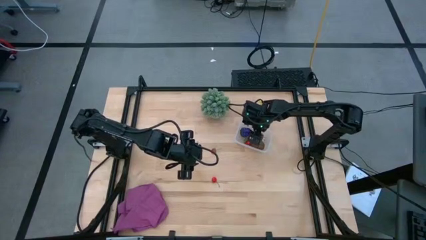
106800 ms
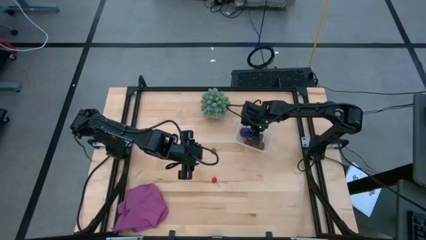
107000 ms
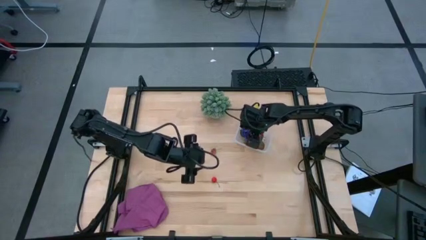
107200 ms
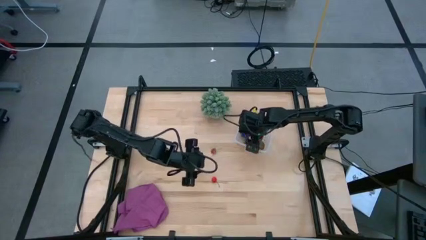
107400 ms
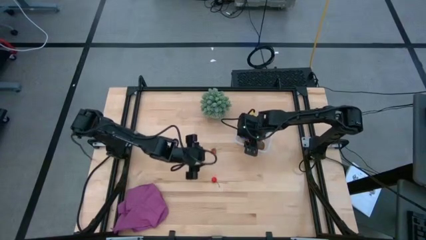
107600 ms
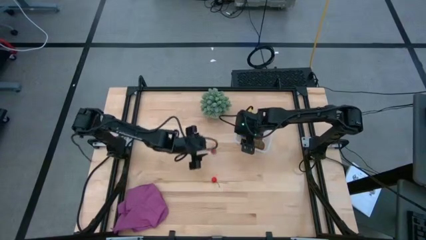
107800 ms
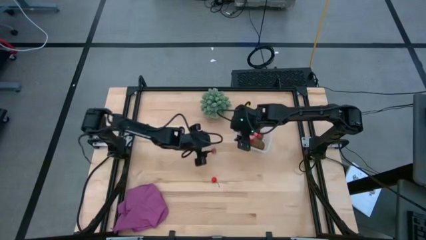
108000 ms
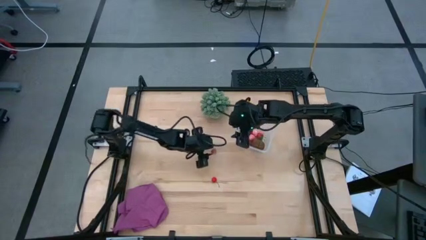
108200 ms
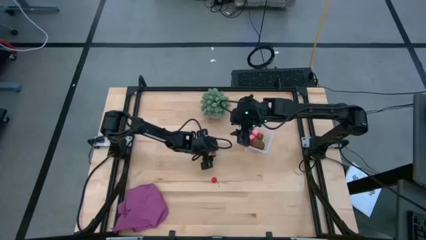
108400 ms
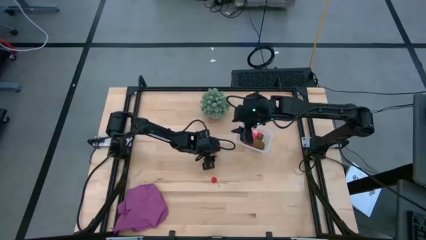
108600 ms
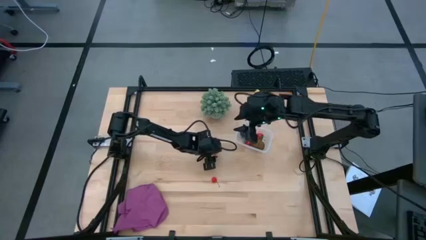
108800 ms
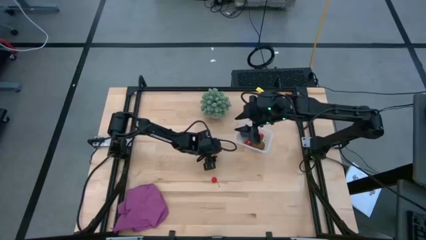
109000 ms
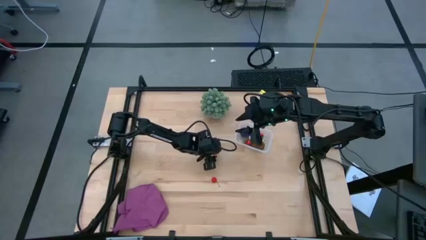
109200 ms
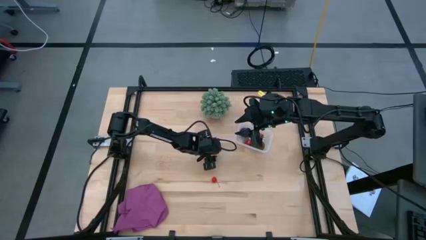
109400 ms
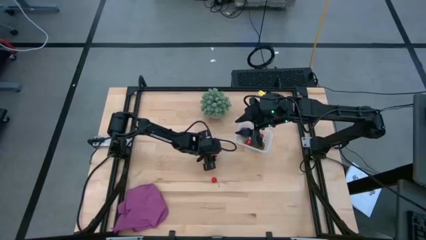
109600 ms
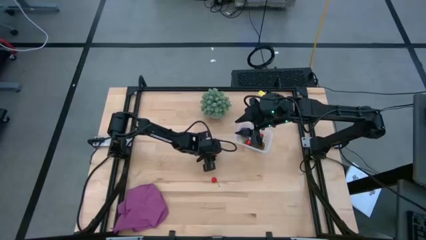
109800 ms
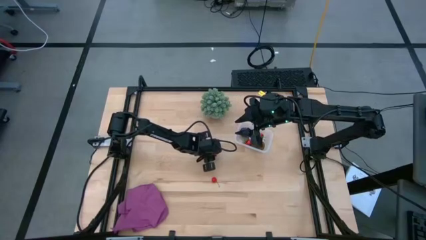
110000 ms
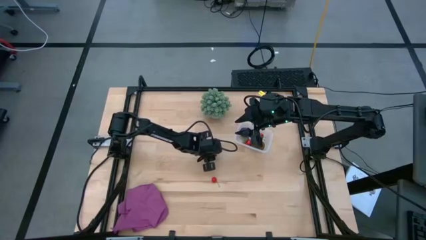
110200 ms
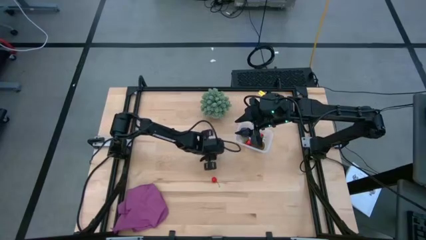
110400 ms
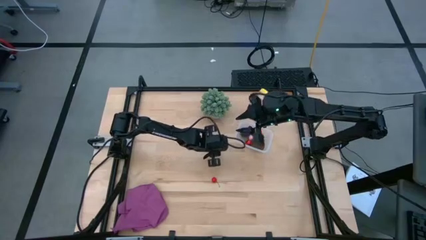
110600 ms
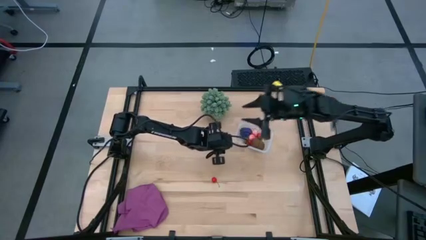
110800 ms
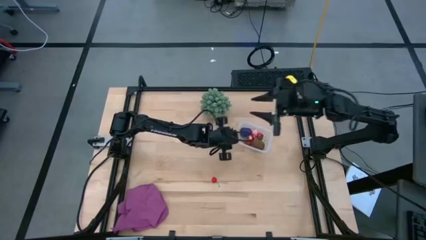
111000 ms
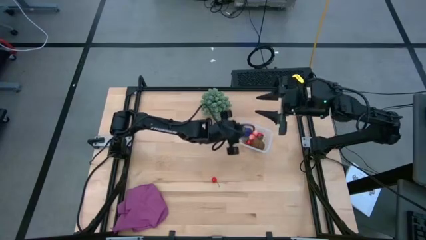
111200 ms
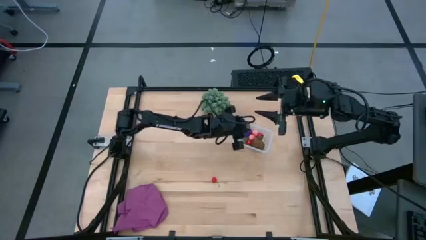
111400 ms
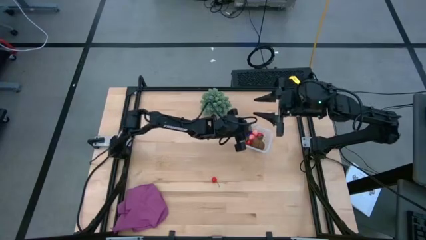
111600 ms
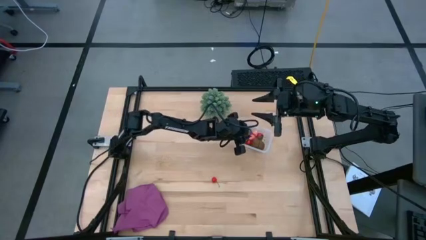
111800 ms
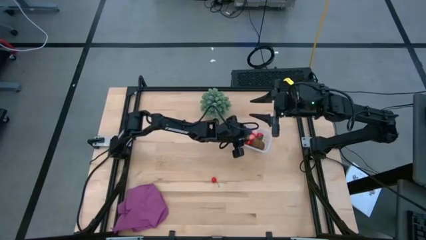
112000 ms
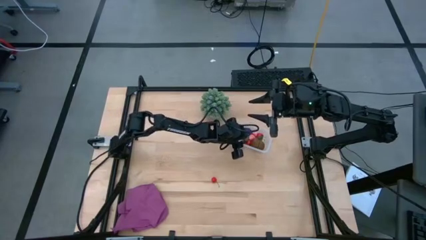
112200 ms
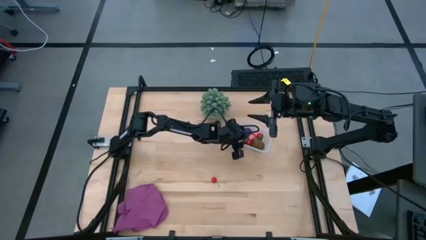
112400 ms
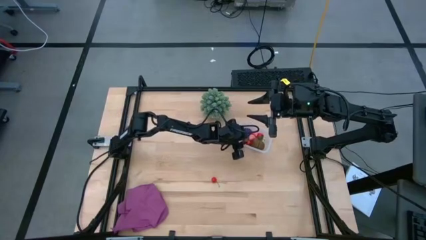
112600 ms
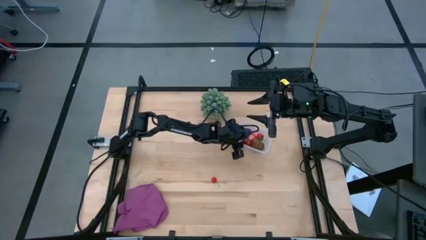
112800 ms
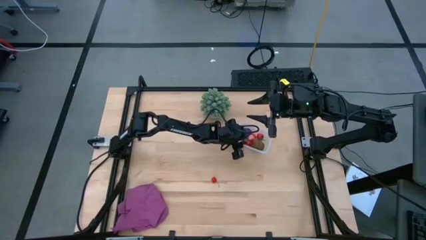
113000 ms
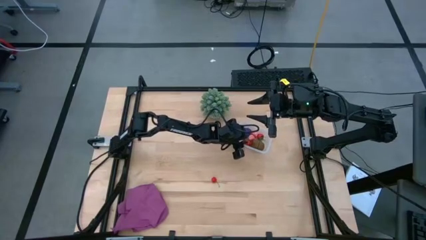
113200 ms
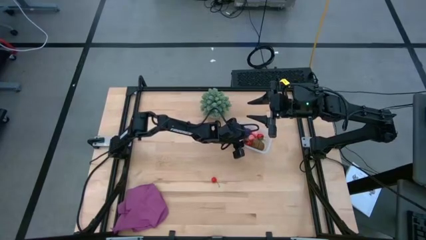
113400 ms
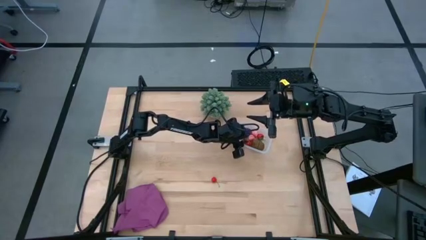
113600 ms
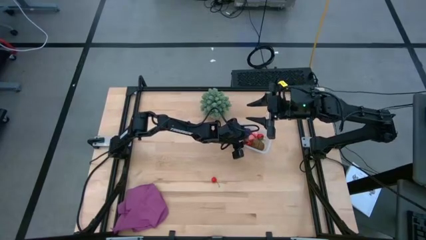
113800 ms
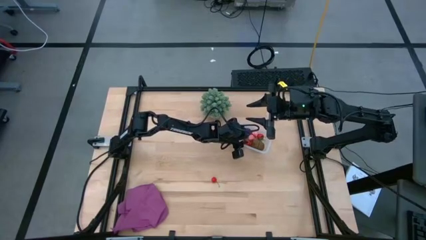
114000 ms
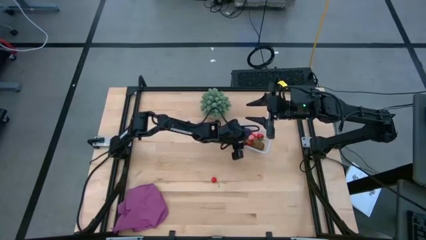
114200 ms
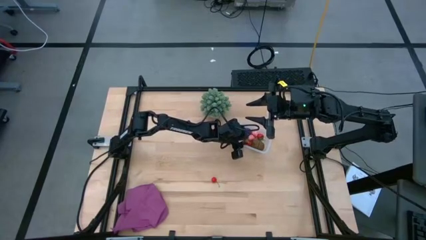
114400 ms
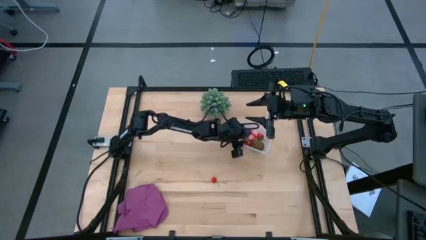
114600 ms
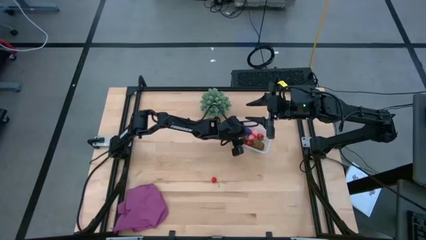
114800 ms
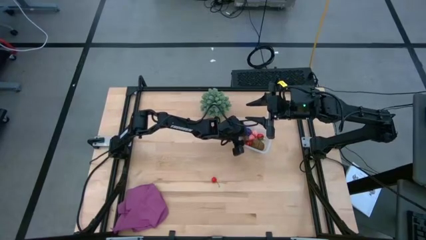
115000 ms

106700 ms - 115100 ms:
Task: Pick and placing Produce into tupperware
Put the red strawberry into the transparent bin

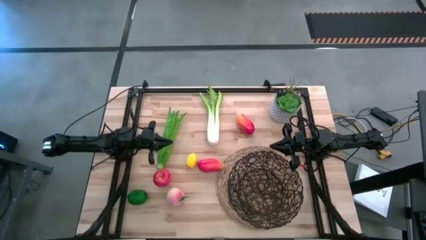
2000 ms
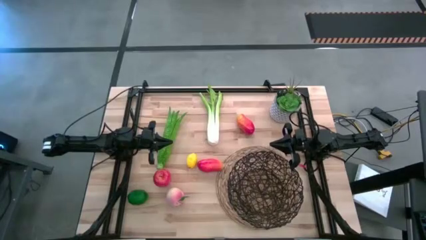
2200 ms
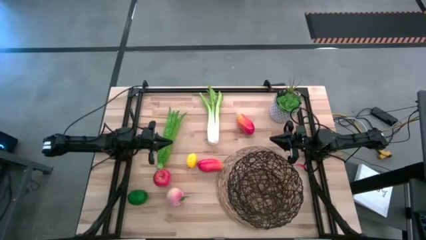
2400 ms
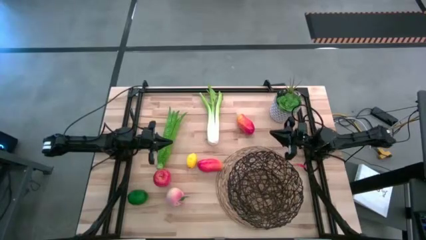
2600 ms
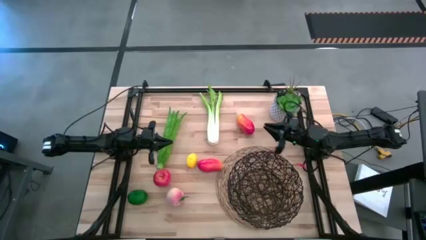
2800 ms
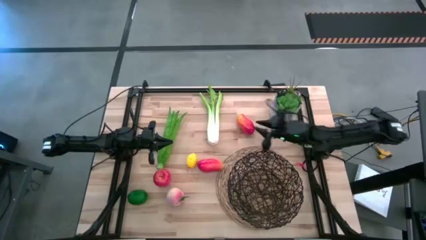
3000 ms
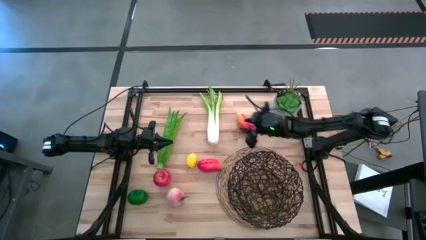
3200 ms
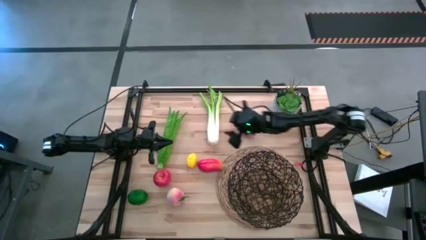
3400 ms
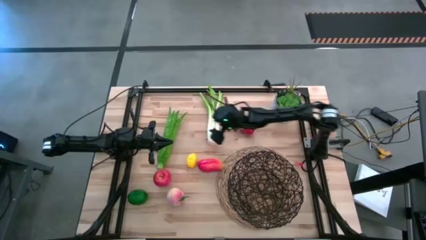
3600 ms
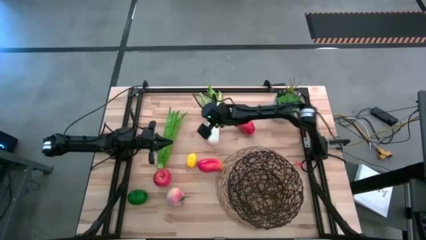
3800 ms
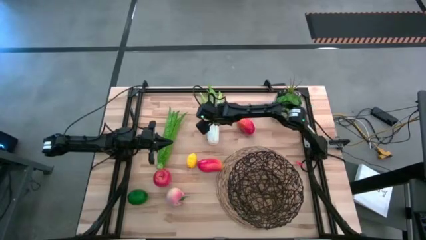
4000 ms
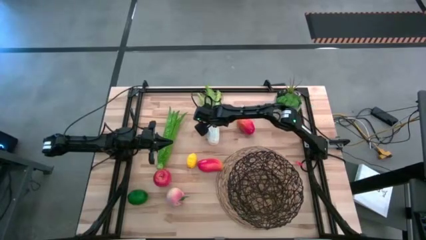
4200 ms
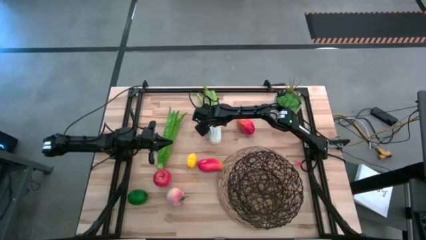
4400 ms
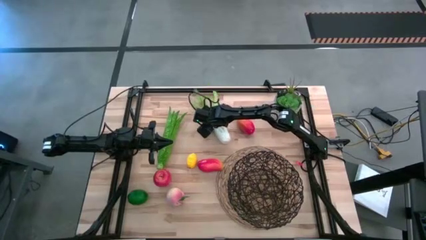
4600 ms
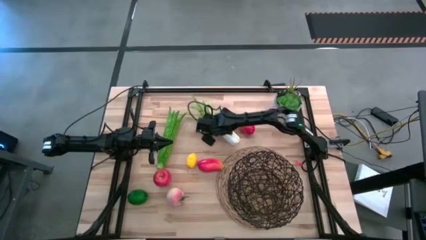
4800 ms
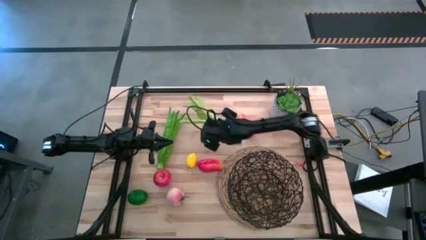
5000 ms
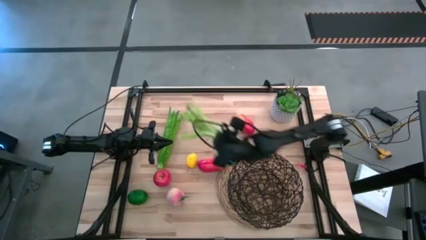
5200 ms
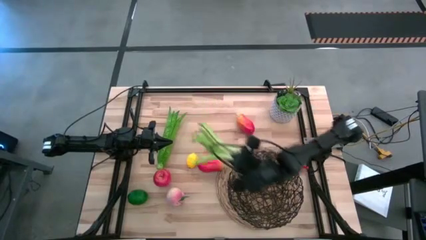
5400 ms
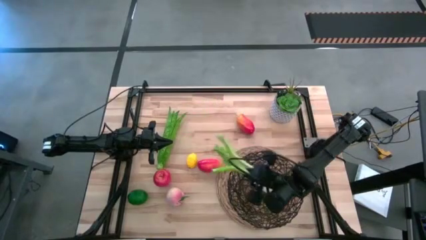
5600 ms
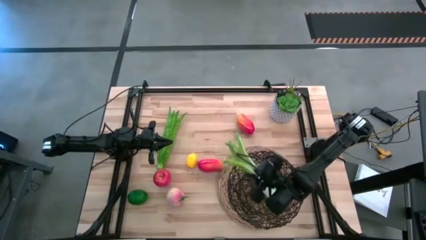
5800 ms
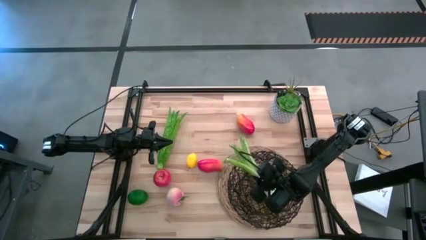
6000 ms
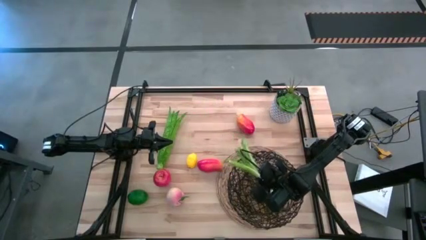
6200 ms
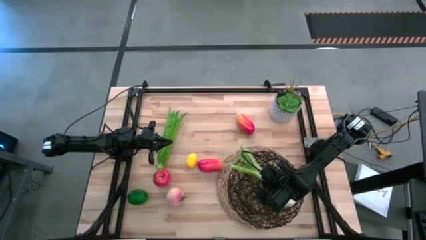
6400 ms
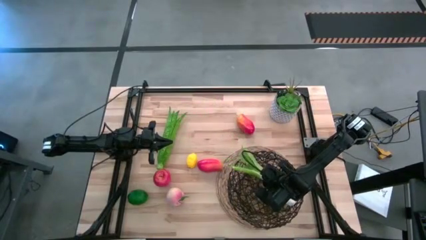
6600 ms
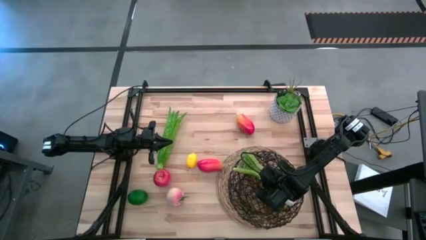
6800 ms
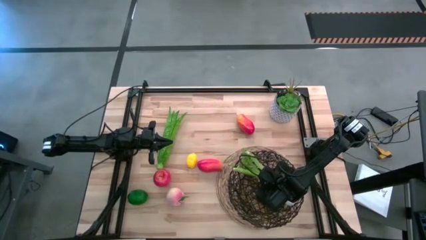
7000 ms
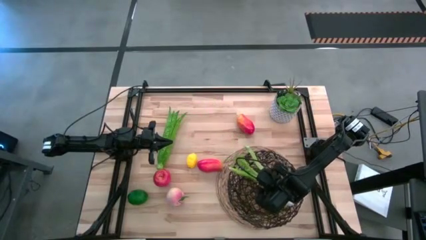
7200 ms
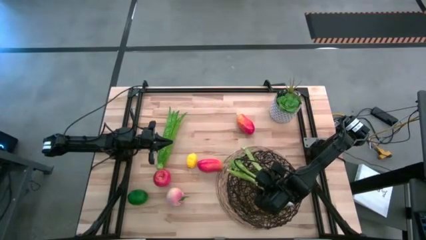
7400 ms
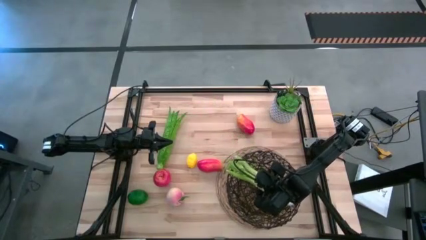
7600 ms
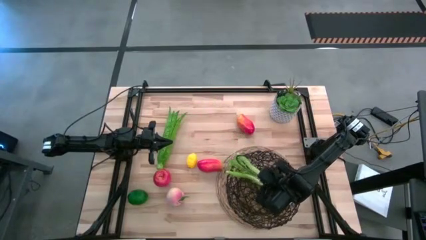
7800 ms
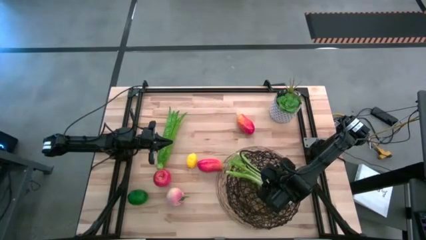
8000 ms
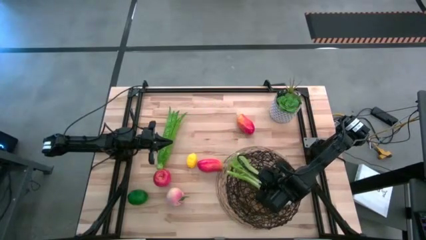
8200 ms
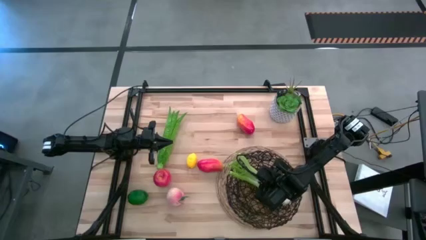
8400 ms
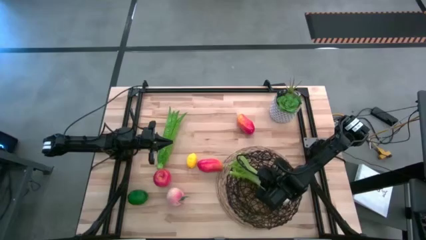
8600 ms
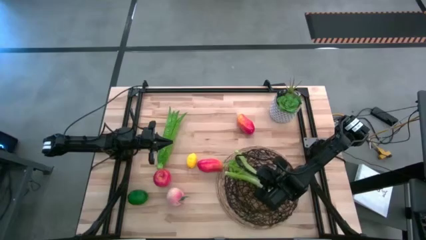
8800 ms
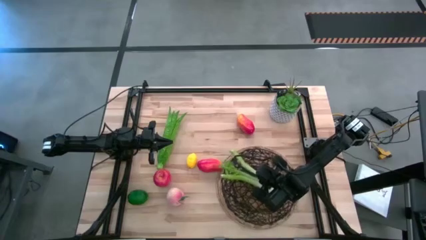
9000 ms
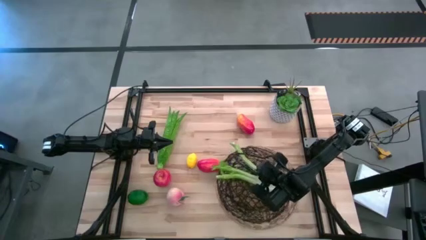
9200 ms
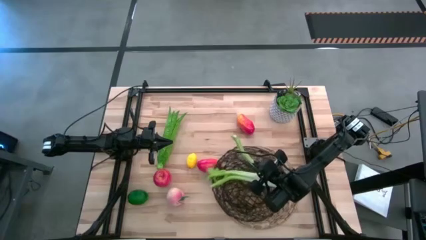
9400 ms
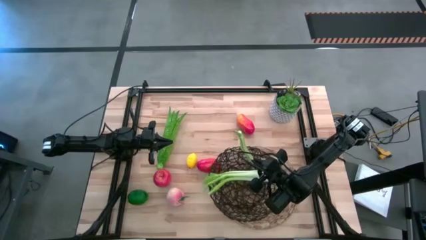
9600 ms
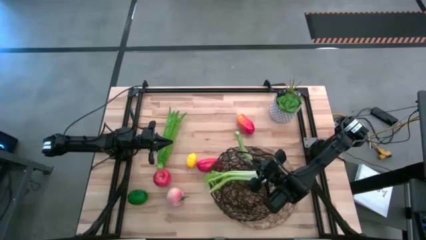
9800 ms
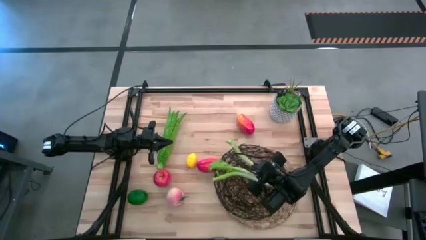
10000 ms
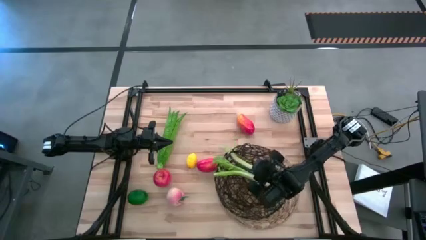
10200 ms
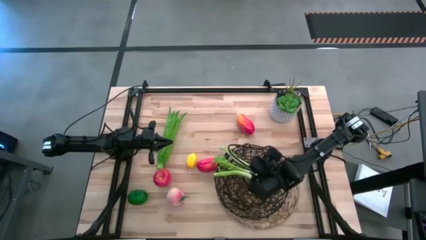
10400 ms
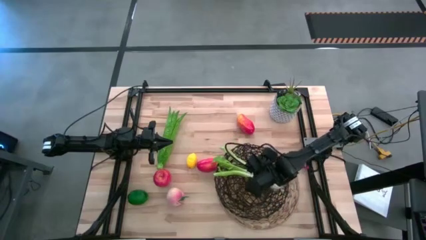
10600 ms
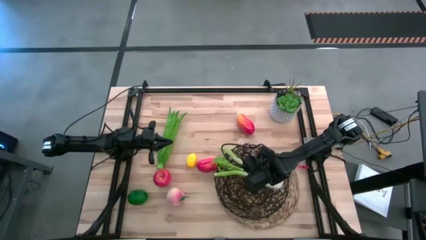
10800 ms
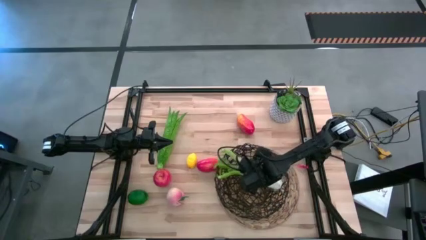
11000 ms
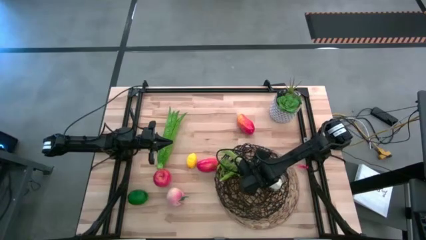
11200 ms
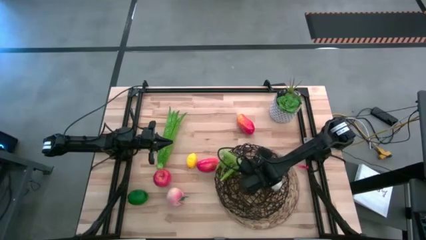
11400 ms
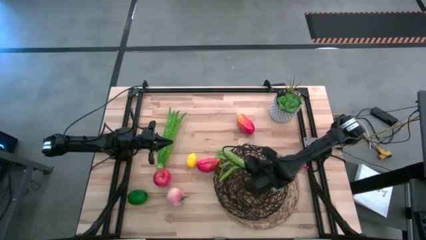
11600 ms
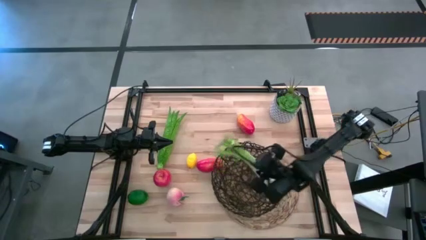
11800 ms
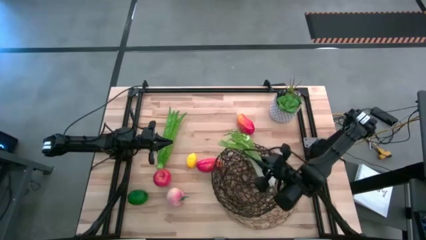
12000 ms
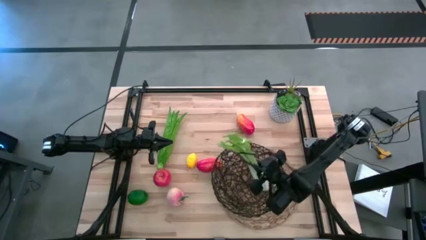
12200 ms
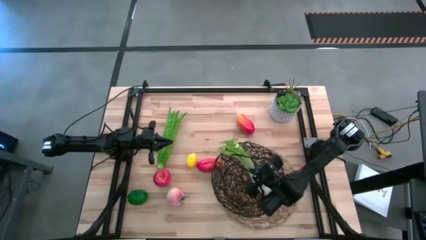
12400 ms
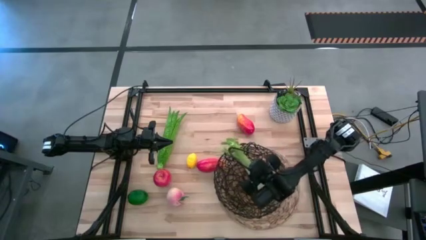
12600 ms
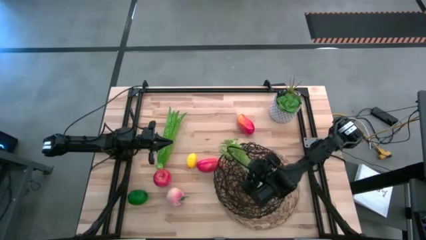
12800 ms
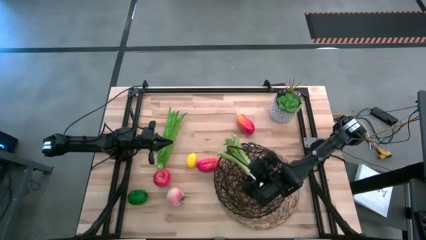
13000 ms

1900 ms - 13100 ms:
Task: Build produce basket
Put the celery into the wire basket
